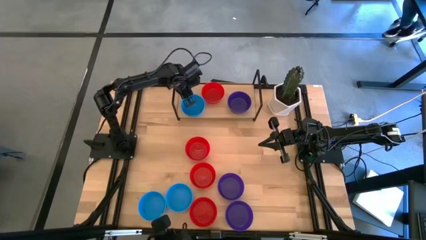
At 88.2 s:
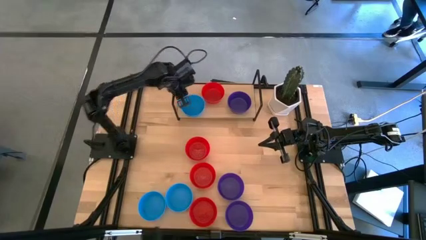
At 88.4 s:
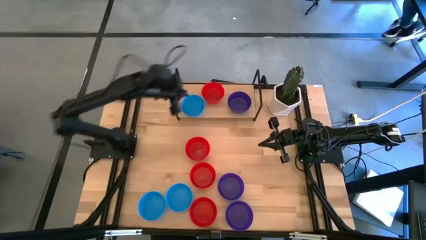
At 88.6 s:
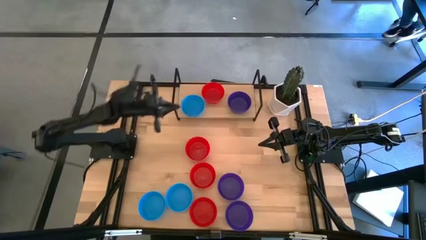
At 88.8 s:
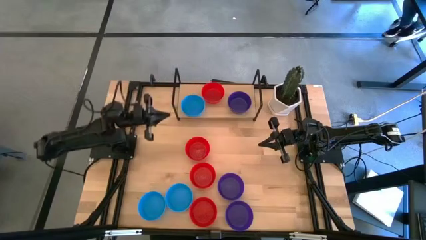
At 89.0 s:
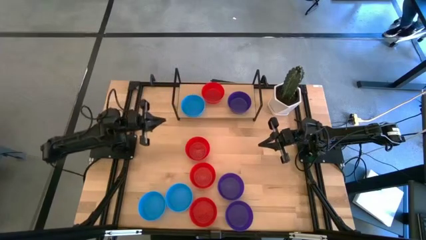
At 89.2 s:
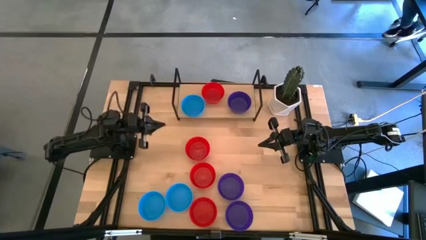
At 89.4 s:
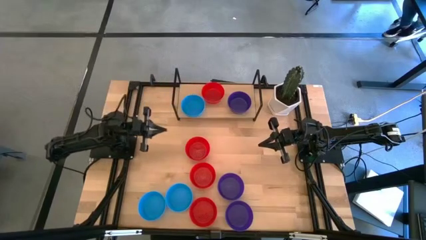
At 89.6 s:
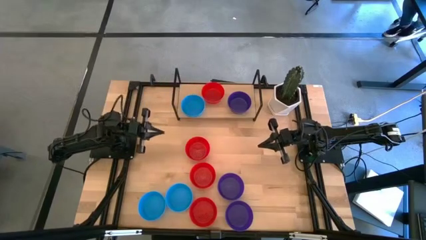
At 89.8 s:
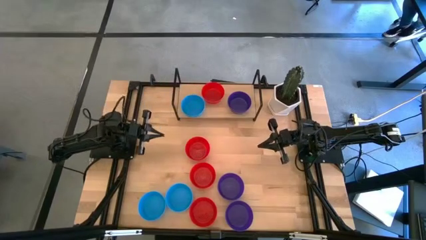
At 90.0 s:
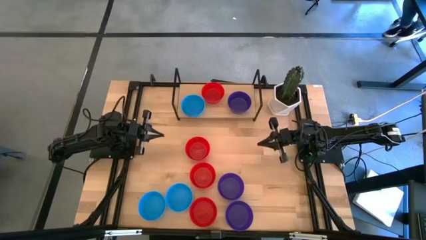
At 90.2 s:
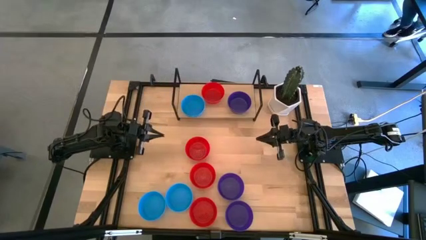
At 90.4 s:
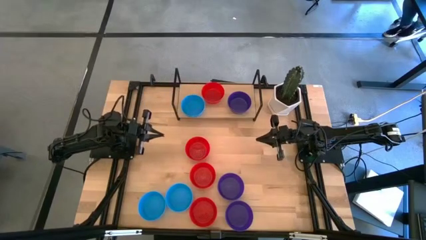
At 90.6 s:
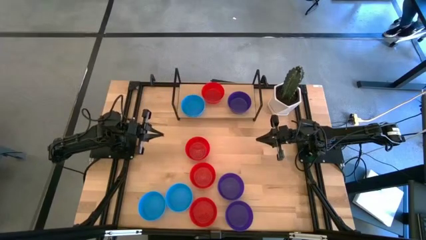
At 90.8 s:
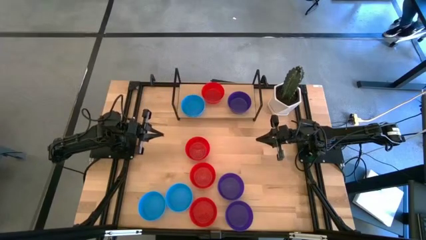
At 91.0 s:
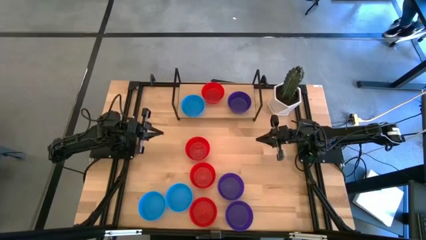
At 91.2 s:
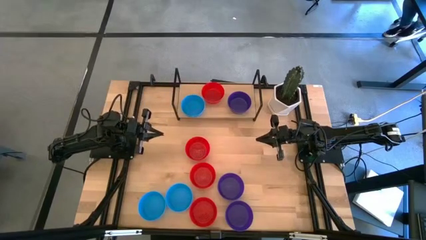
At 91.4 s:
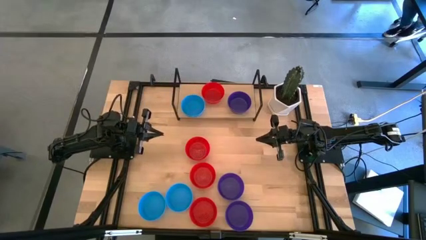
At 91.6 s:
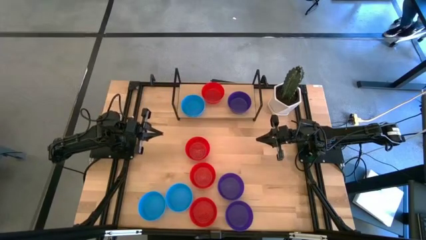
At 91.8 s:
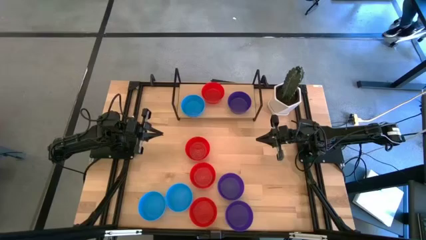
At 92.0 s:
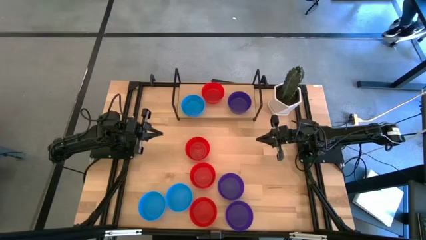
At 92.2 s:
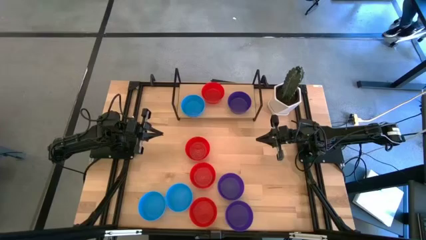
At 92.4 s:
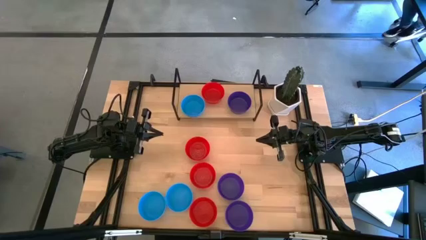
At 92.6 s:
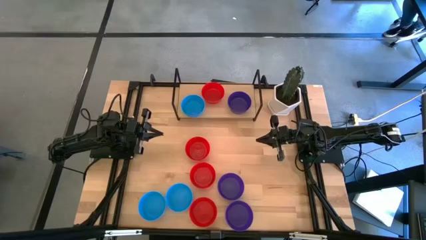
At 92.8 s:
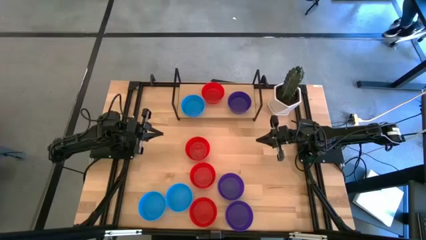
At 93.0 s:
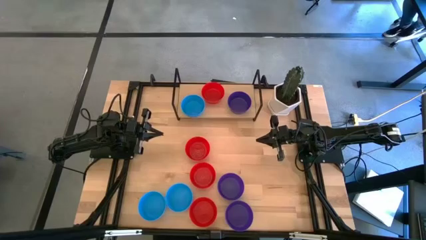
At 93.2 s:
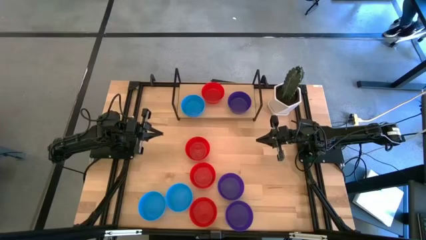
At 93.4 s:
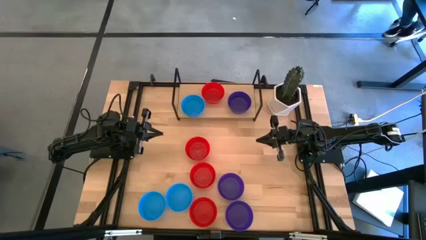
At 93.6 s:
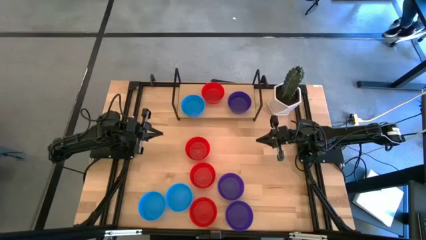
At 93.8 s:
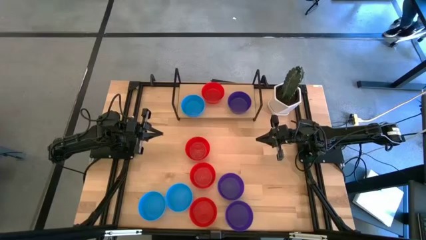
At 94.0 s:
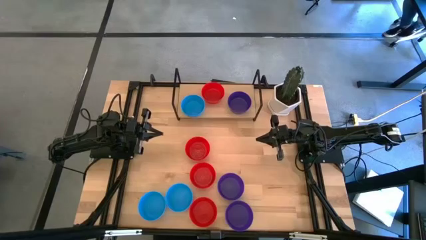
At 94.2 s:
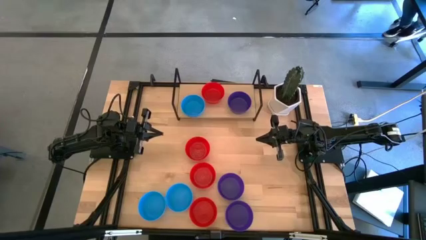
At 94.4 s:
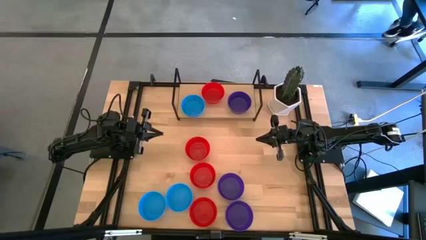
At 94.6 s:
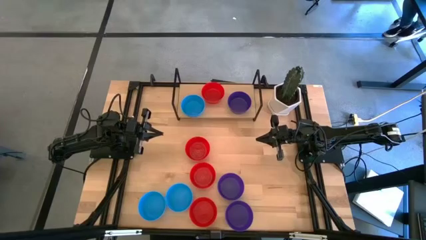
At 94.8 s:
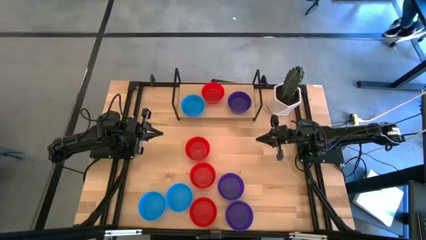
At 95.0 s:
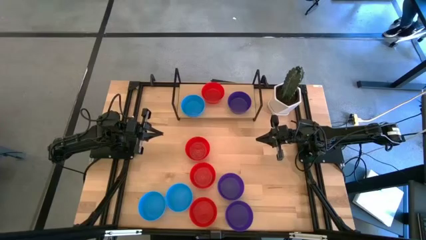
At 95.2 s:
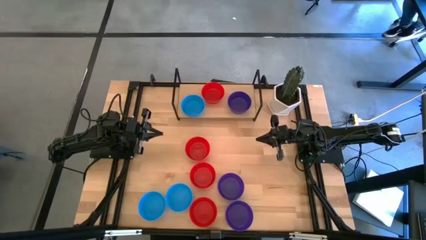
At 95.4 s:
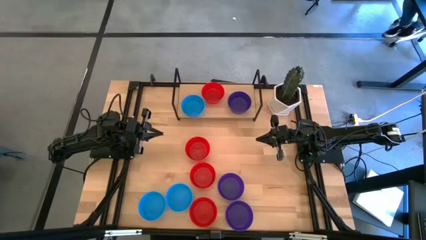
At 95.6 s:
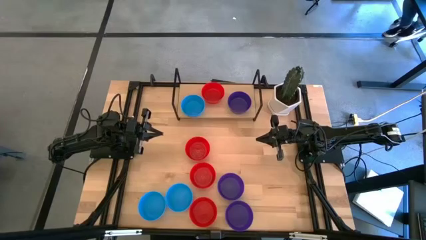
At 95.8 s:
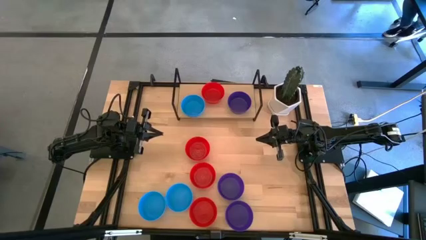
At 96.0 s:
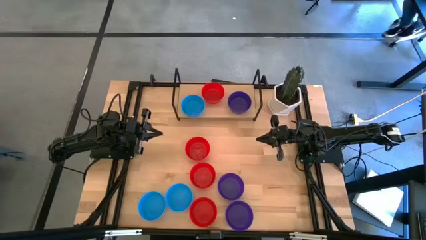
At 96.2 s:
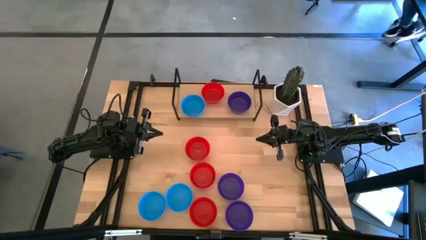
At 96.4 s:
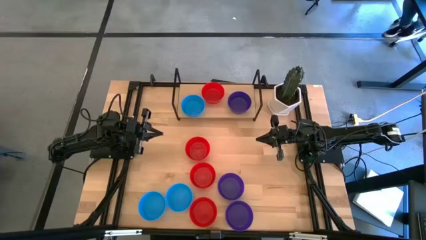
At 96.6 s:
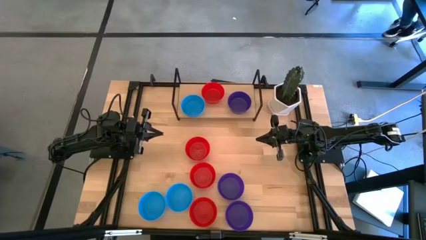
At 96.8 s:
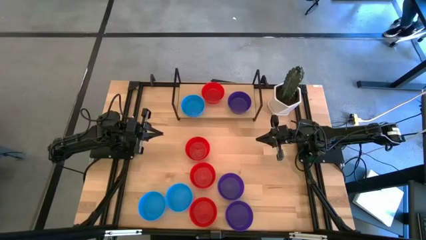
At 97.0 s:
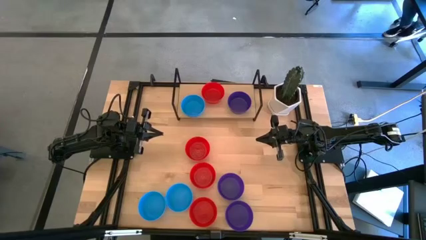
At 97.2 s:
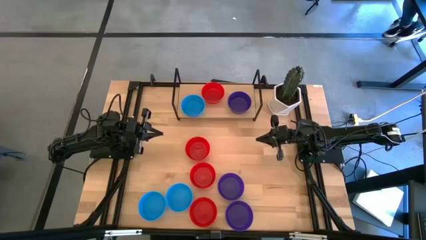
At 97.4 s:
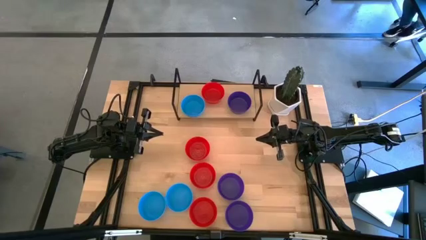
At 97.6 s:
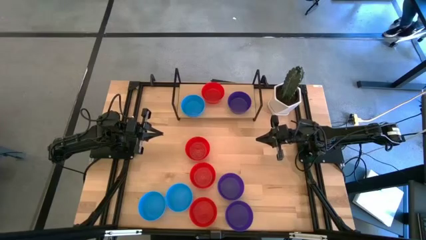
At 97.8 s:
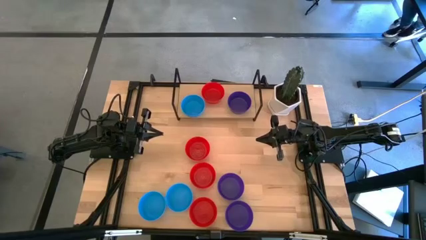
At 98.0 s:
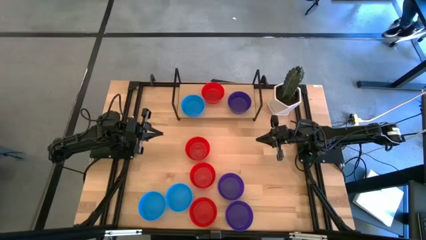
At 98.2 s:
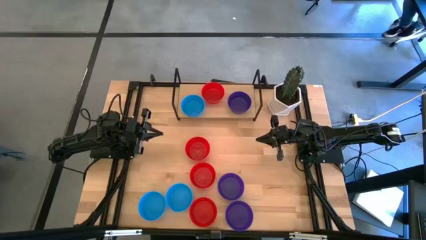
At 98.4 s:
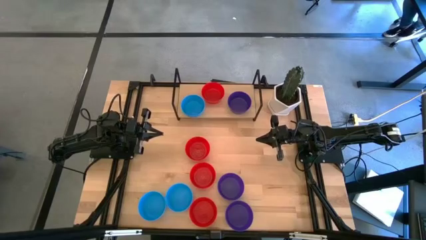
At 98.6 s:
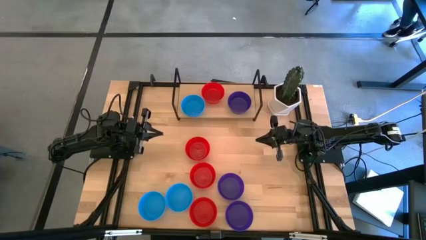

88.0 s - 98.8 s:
Task: Pick & Place Mini bowls
Stack the red bowl on top of the red bowl on the shelf

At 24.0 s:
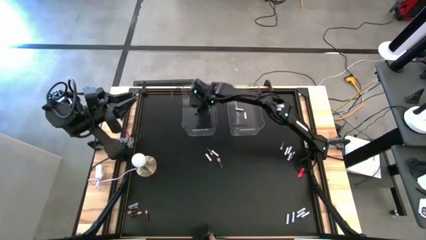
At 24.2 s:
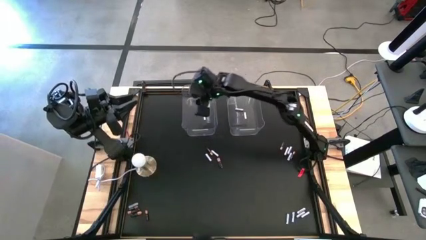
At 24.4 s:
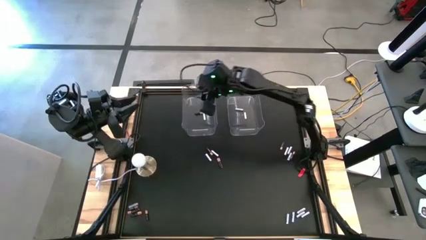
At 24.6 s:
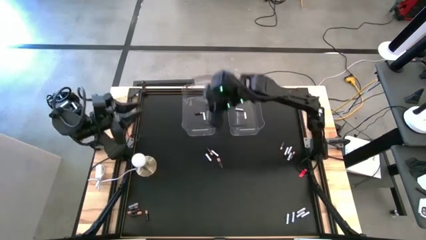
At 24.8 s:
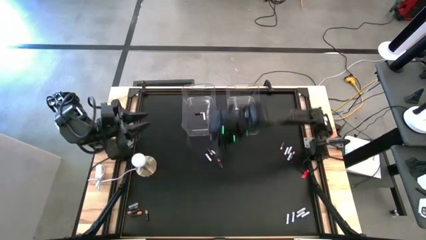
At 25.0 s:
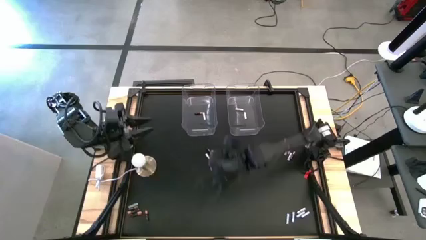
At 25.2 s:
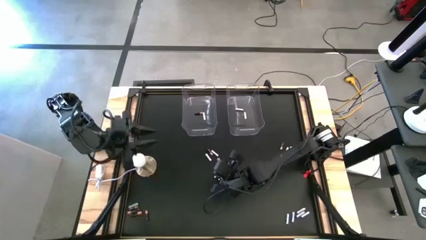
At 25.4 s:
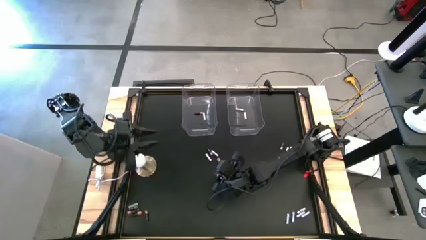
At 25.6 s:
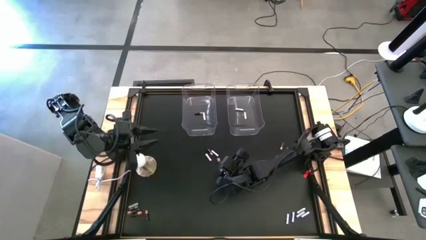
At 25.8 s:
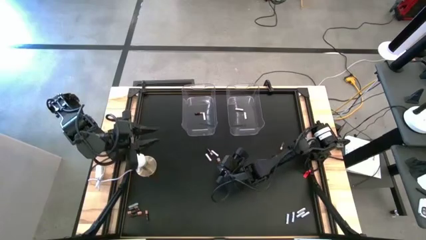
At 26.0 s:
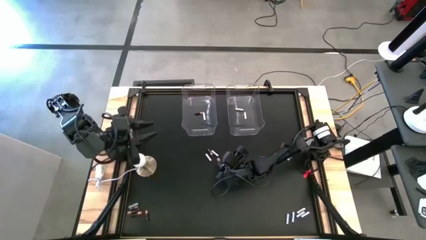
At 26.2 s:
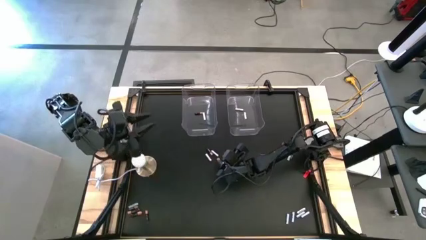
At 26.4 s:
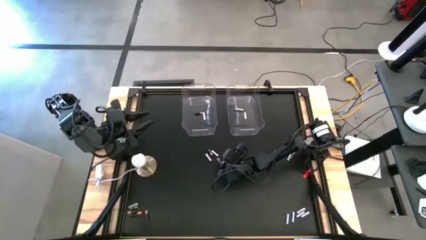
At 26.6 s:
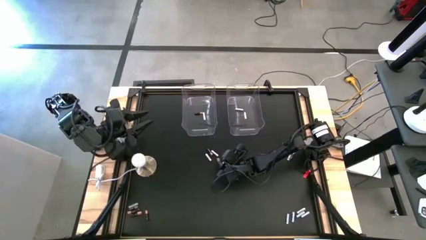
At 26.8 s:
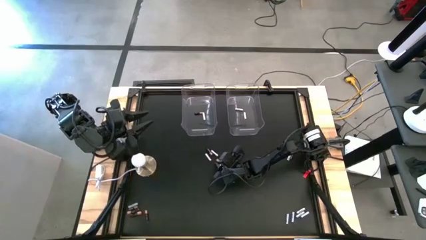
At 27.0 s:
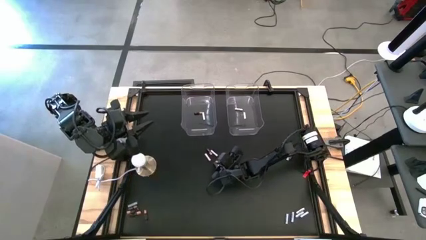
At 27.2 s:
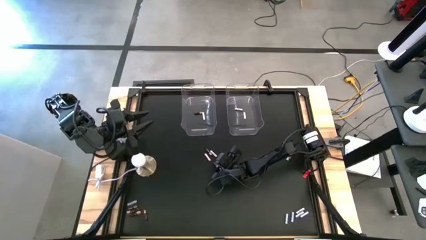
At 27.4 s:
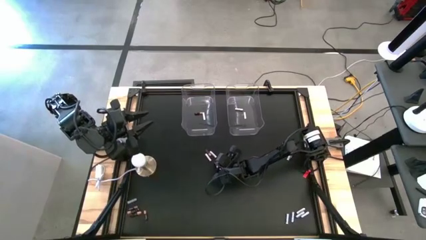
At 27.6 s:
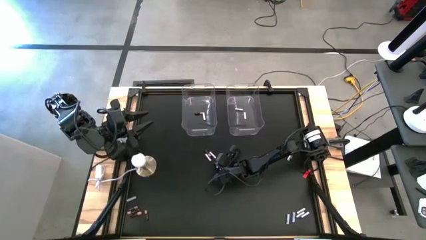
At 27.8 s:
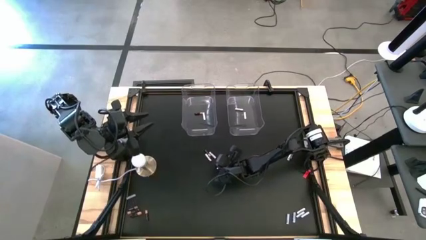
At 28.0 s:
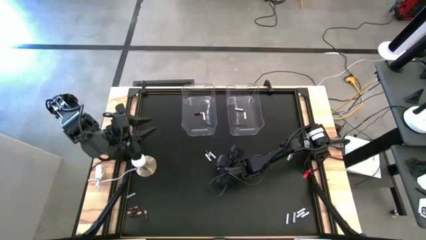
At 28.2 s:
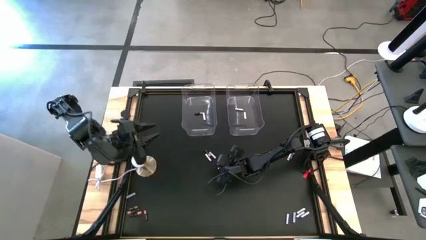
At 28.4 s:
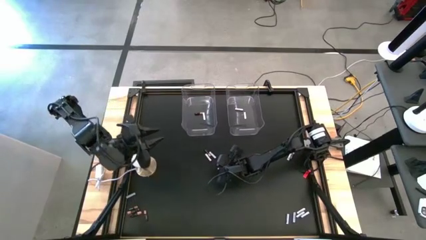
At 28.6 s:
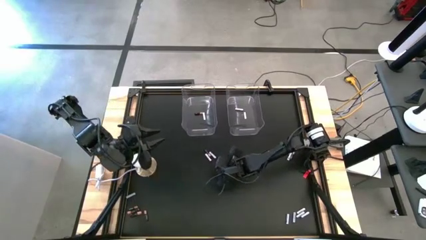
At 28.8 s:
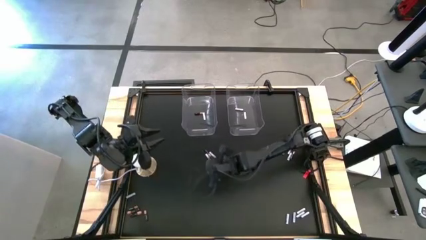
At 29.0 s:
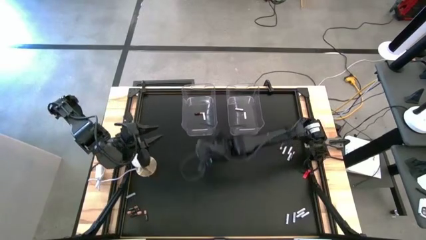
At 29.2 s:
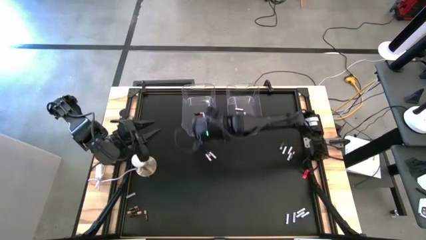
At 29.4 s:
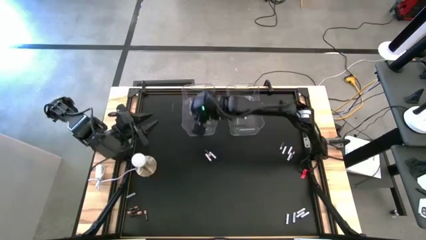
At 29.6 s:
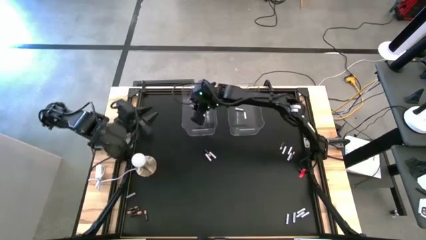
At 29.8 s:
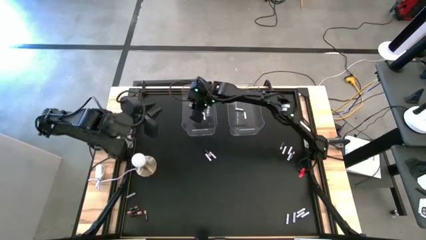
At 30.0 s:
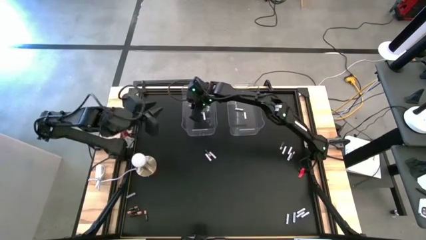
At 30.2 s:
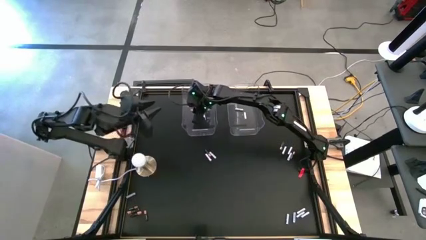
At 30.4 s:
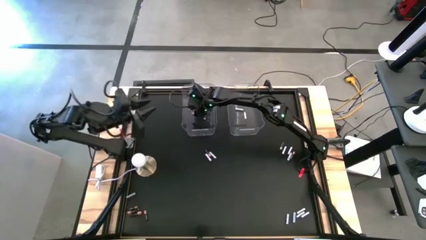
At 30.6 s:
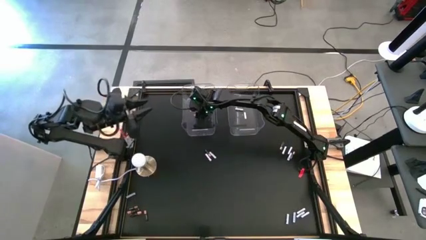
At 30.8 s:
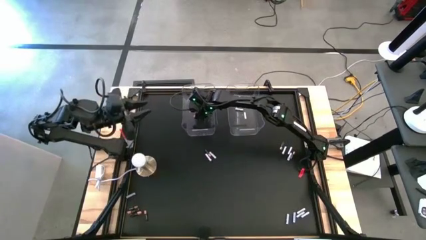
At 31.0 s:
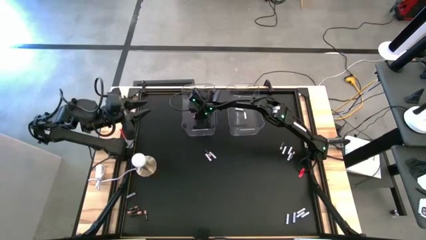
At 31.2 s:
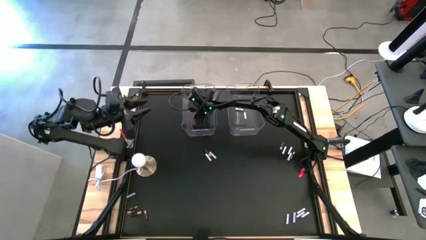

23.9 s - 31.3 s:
Task: Sort batteries
Put the black battery into the left transparent bin
